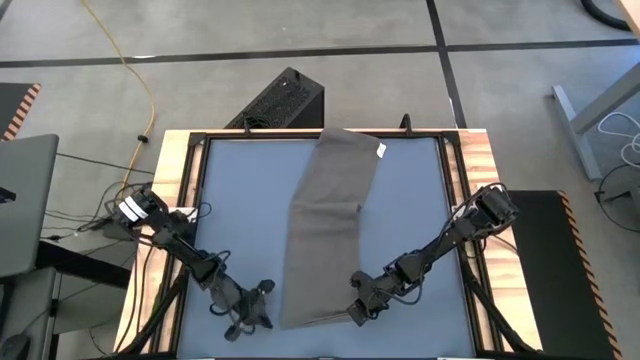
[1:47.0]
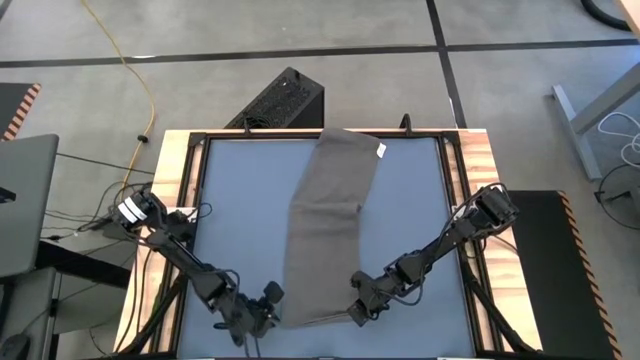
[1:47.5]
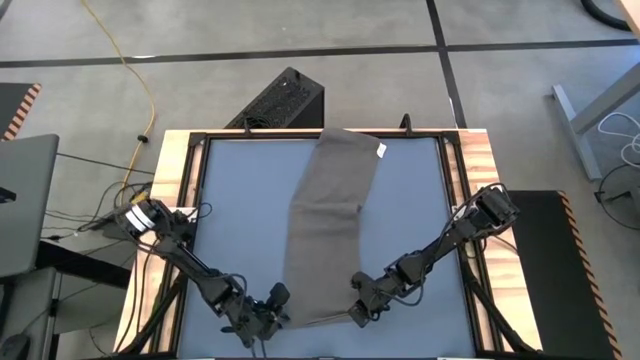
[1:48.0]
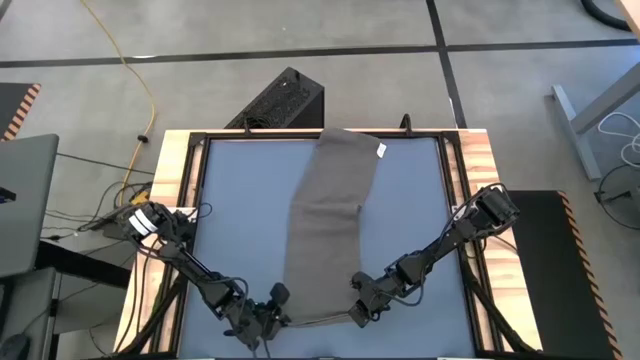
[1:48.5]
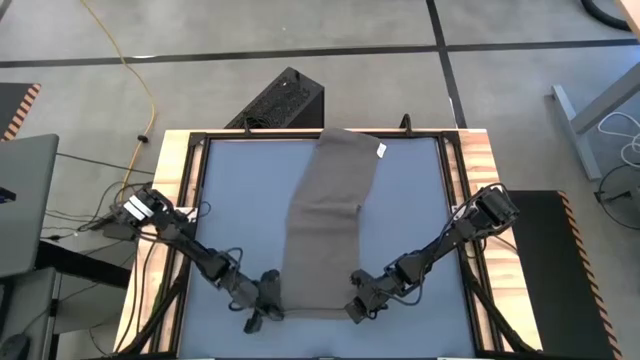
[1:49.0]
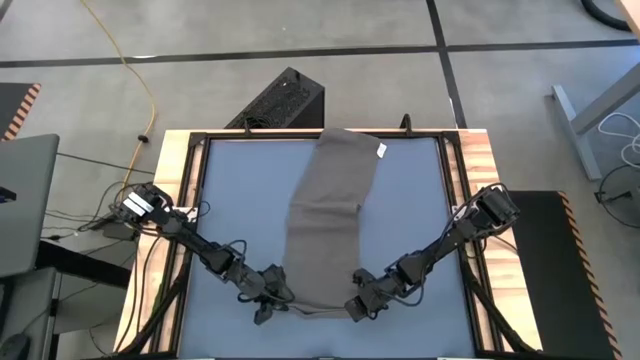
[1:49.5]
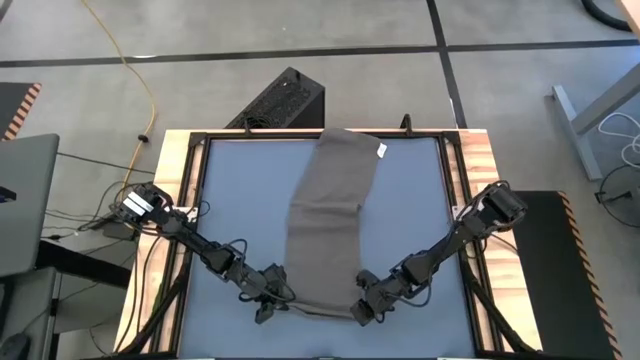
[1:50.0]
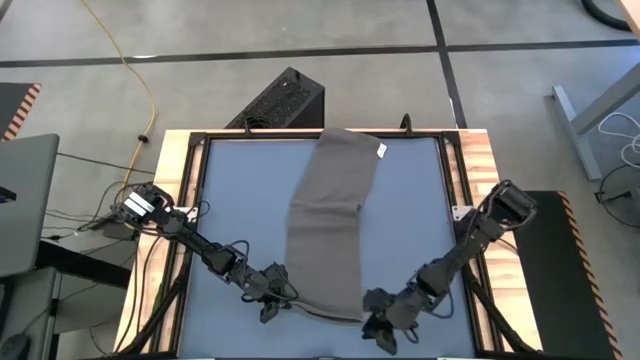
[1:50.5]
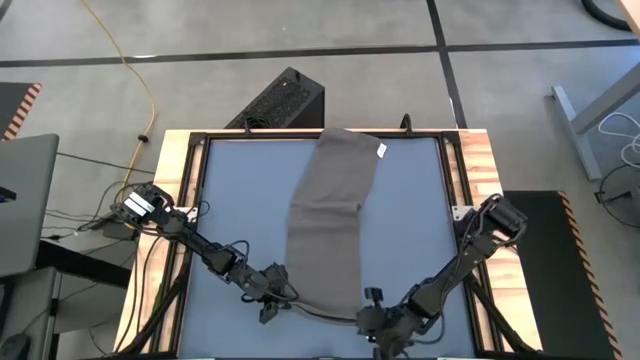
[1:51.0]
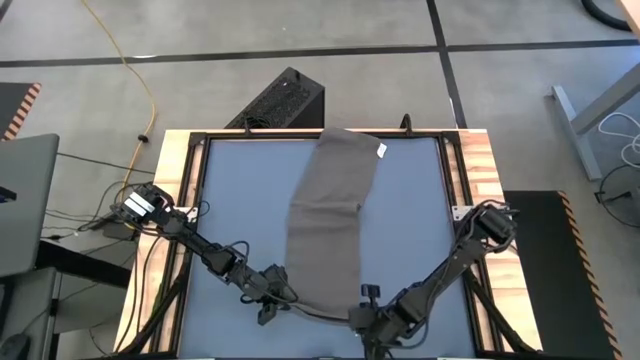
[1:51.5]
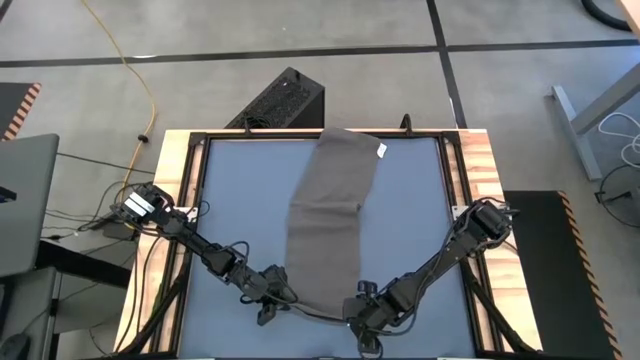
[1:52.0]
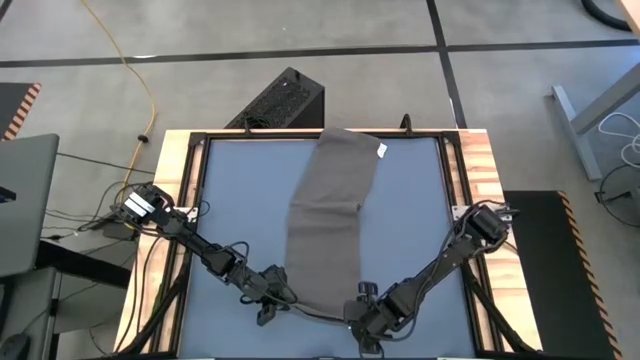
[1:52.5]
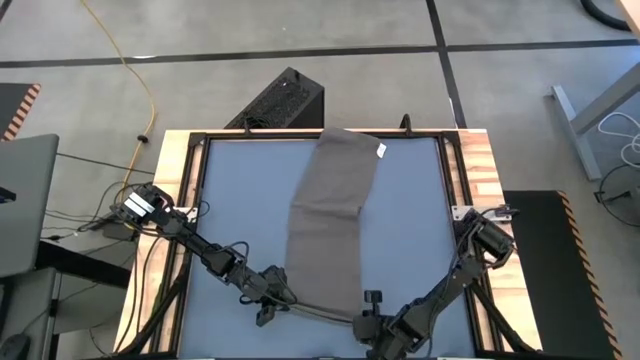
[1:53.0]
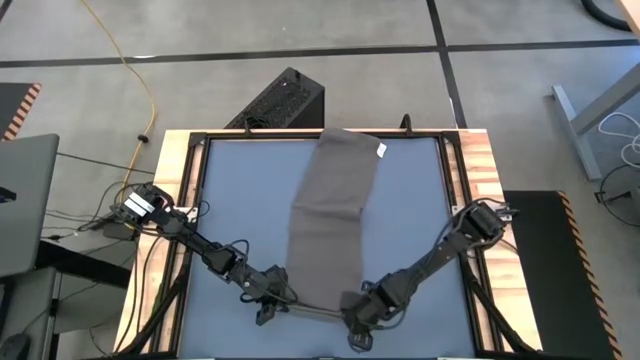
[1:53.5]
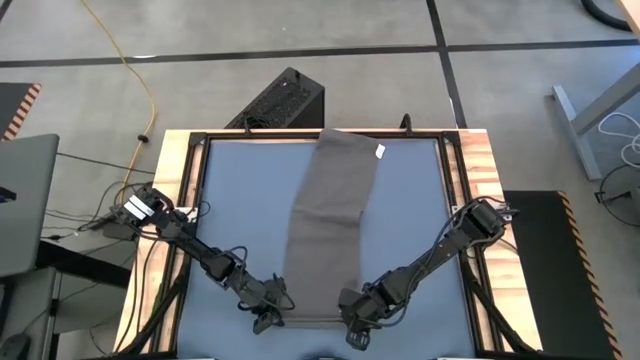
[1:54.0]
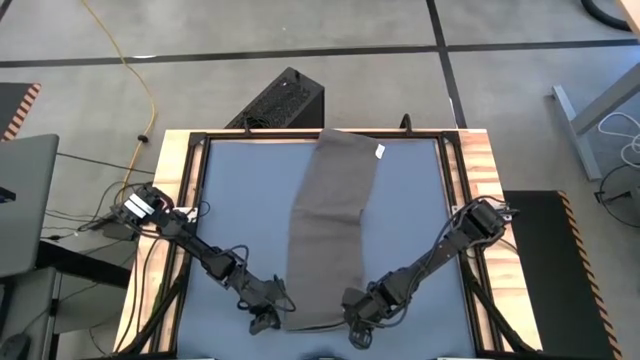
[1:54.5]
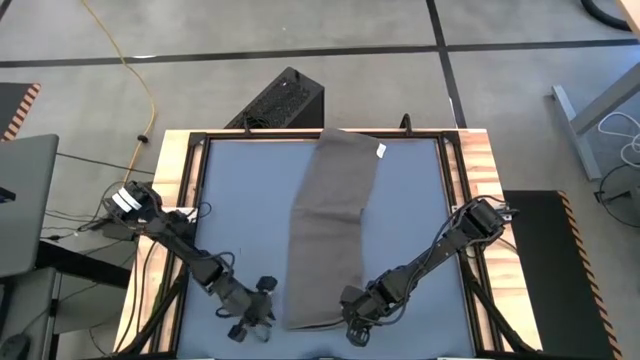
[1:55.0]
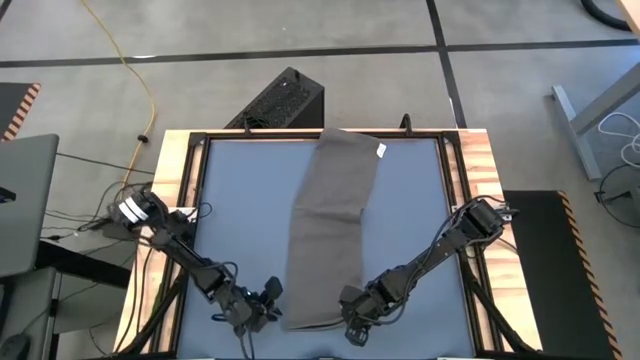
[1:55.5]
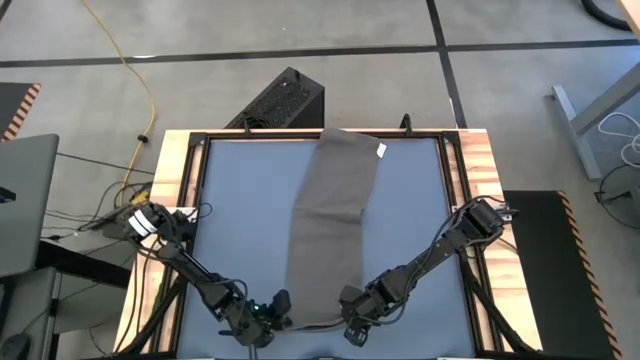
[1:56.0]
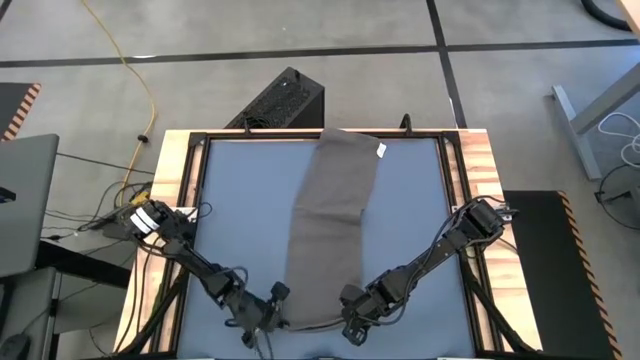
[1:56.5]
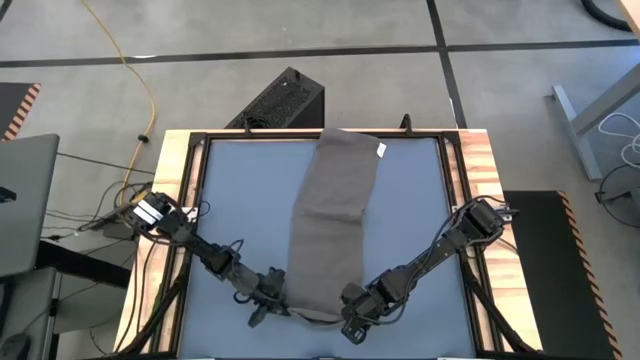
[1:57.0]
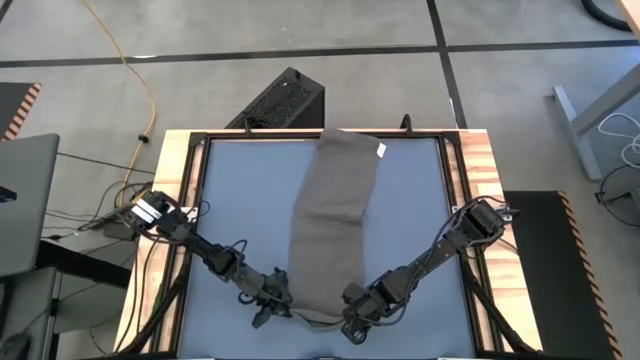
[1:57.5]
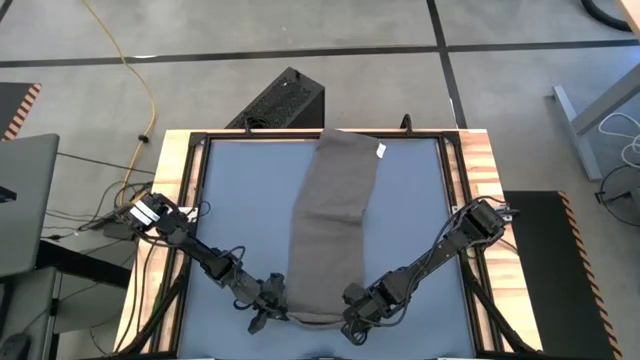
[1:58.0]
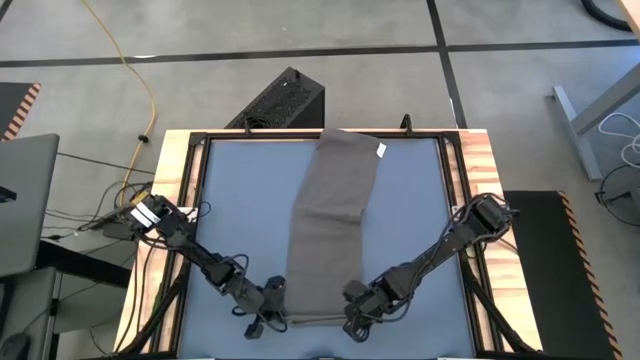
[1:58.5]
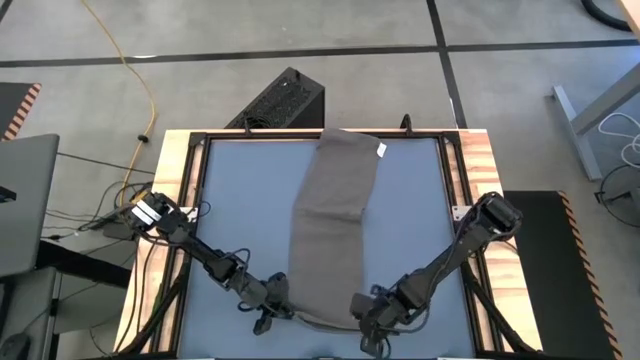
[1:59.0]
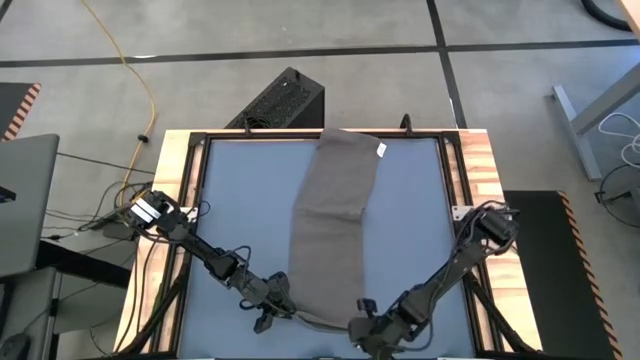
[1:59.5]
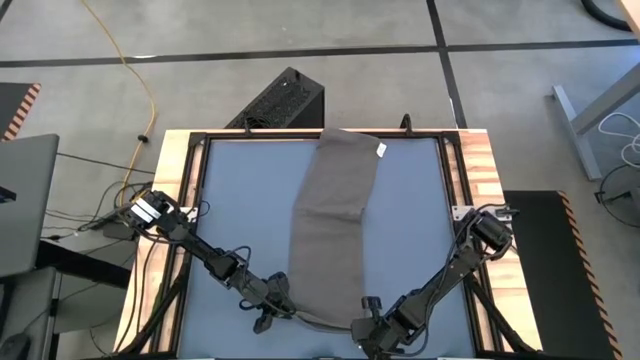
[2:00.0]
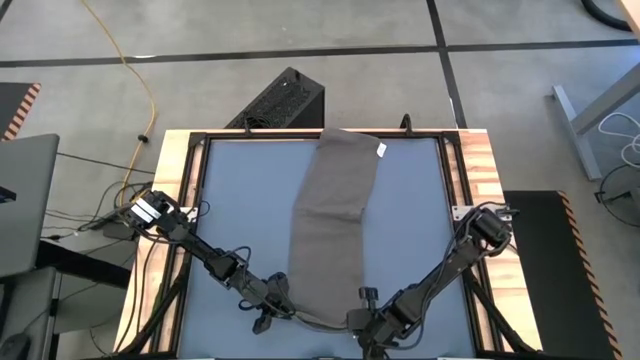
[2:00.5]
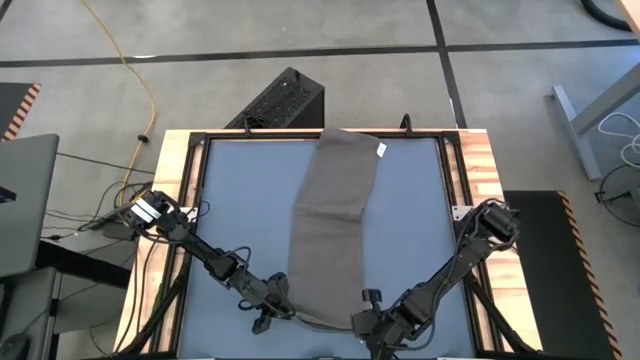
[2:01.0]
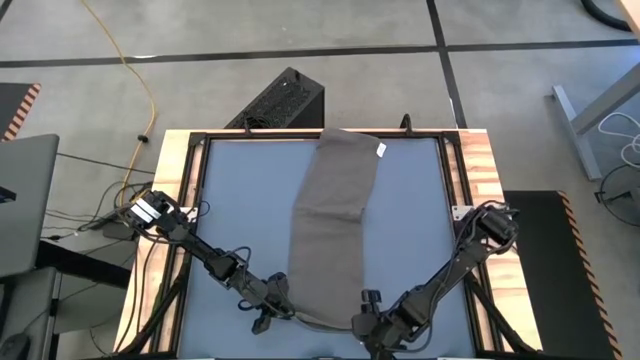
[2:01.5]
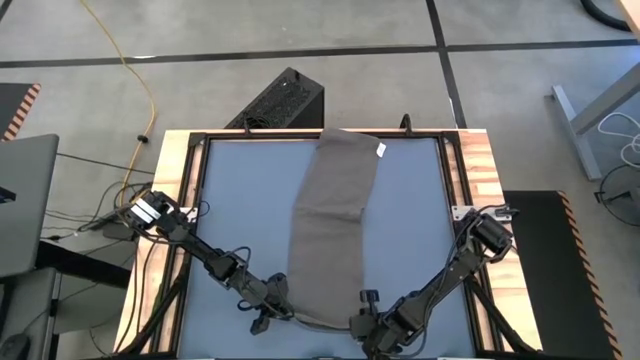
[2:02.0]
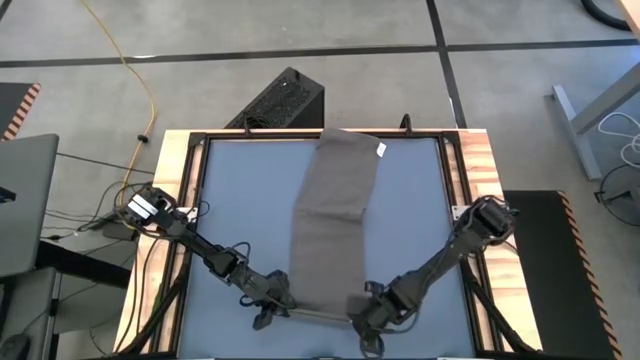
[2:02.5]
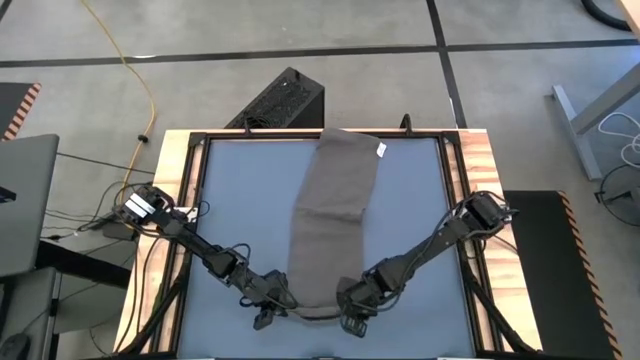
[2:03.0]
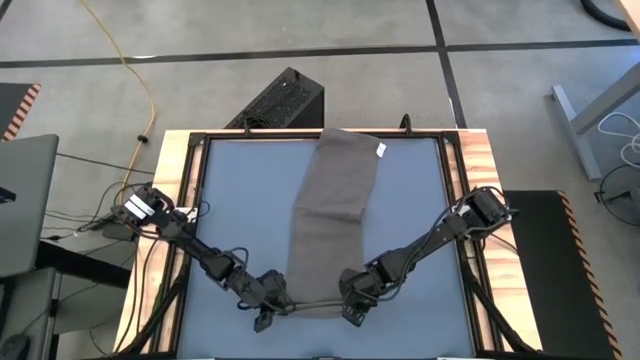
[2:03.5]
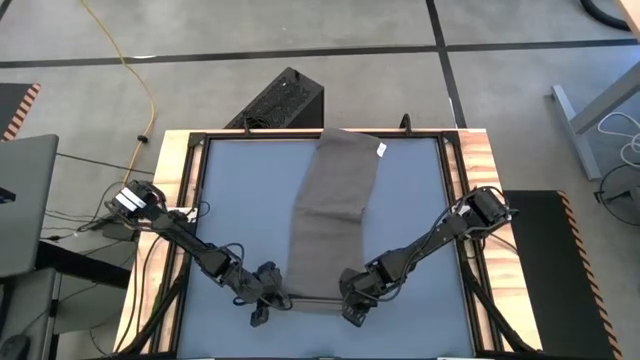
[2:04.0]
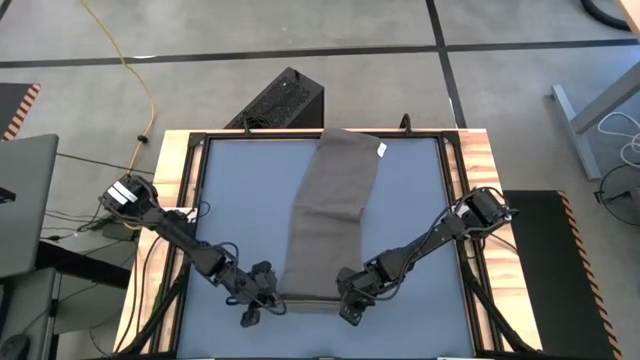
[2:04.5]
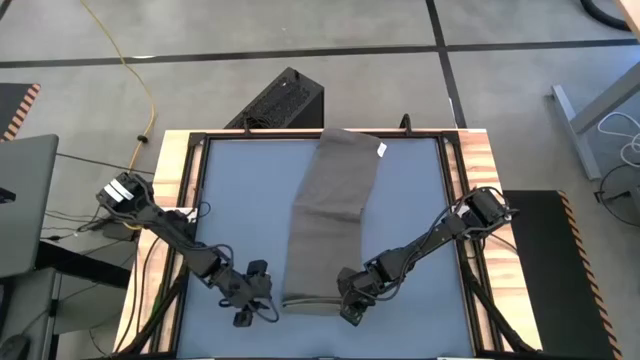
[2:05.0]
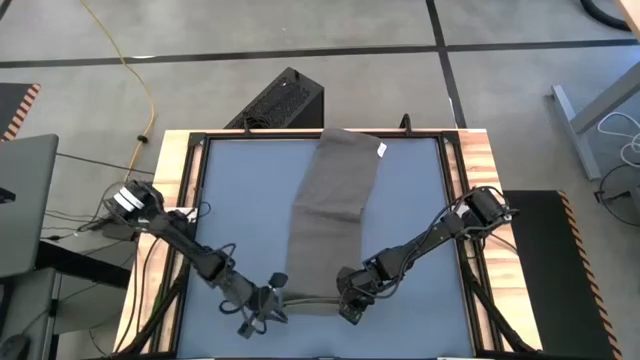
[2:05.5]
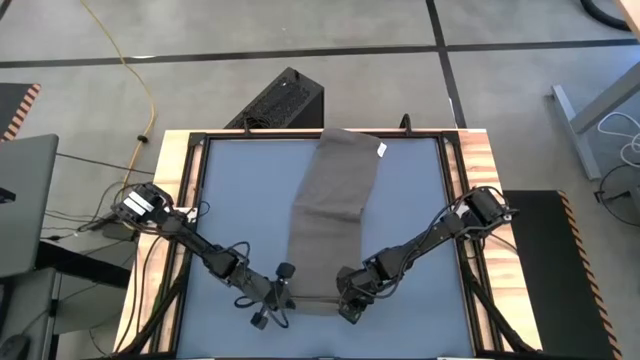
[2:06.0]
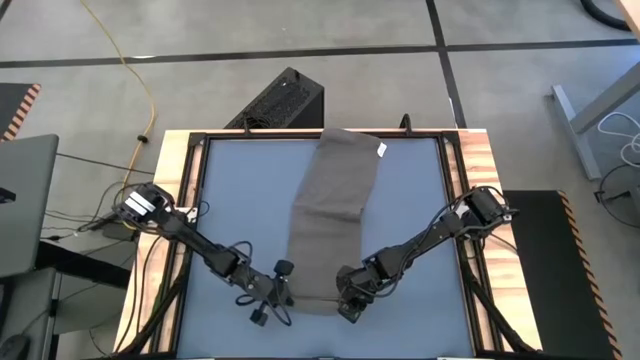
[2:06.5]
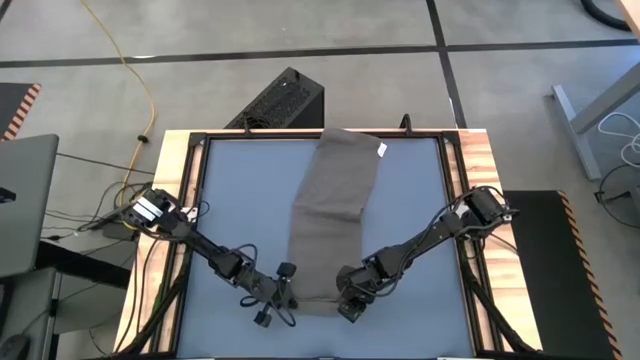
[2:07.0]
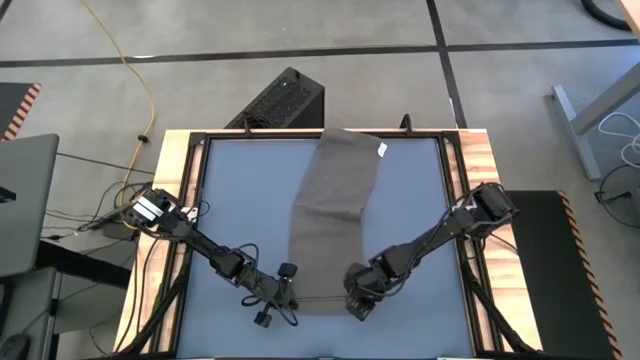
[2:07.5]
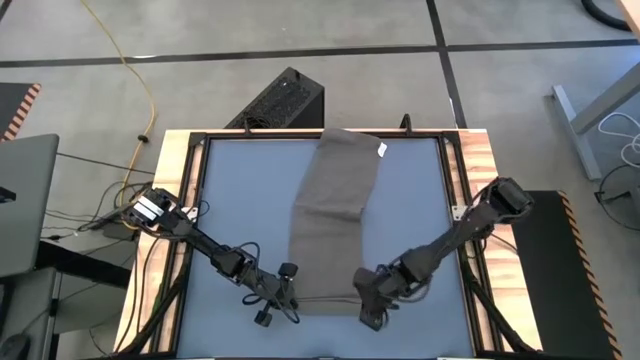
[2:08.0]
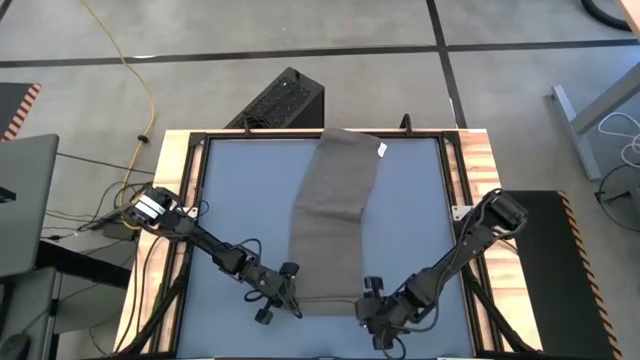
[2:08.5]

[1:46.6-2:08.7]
Task: Roll towel
Roll the gray towel
